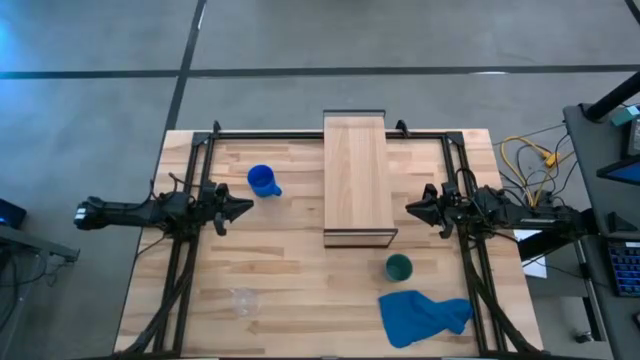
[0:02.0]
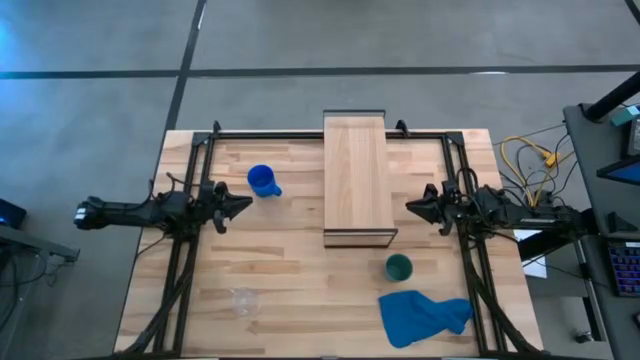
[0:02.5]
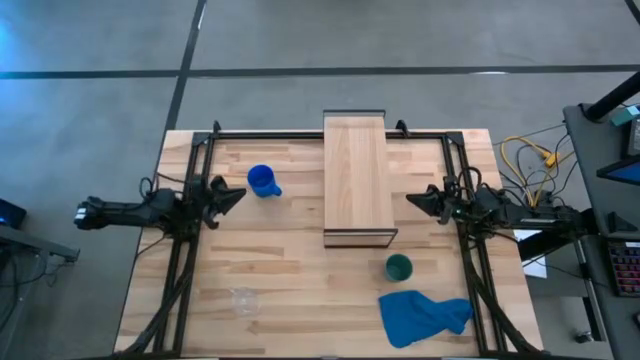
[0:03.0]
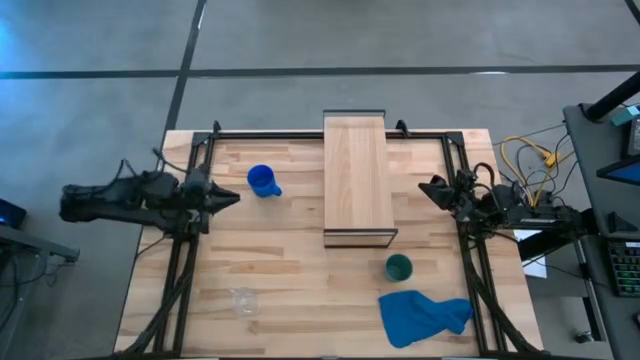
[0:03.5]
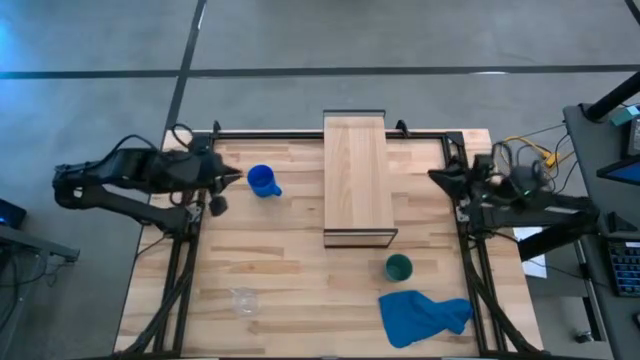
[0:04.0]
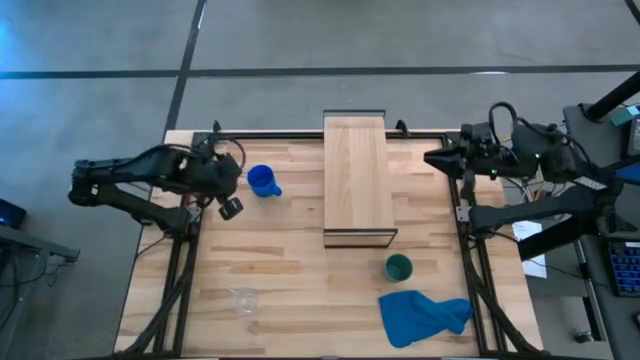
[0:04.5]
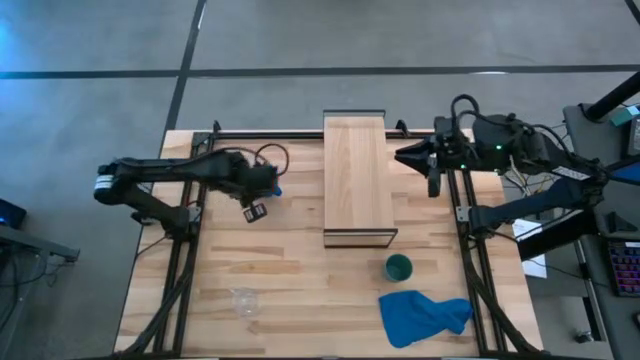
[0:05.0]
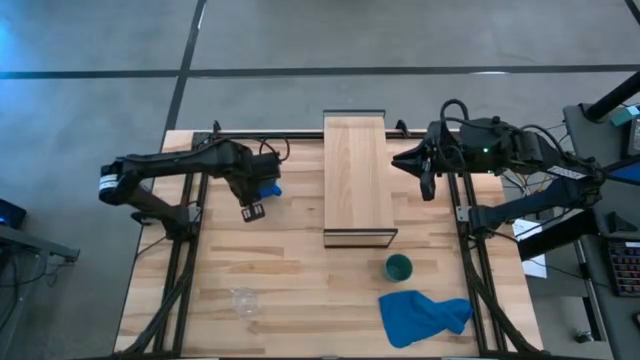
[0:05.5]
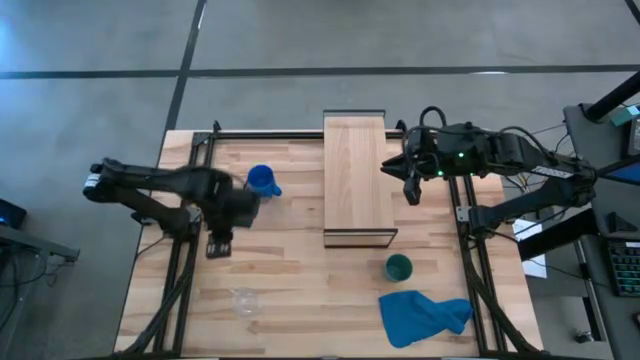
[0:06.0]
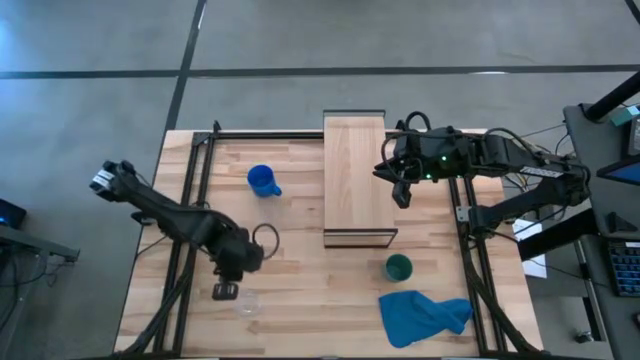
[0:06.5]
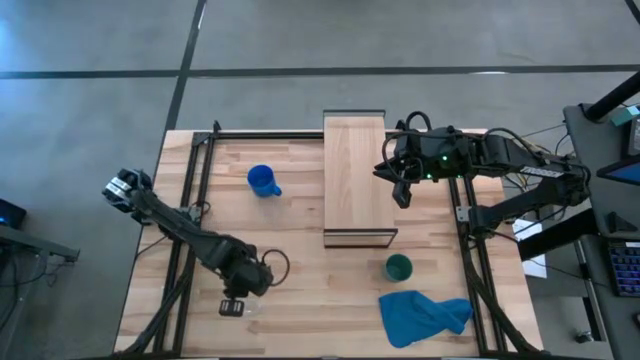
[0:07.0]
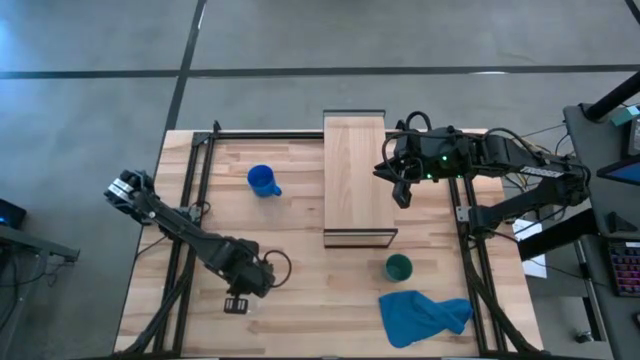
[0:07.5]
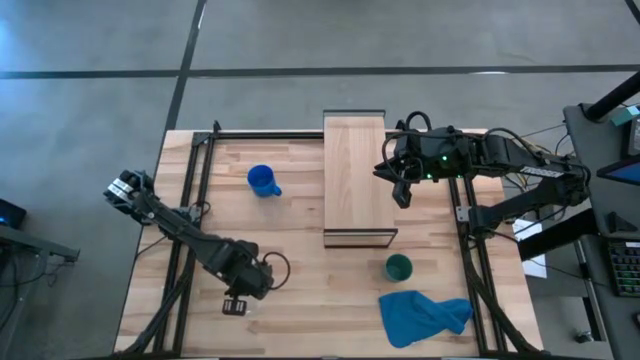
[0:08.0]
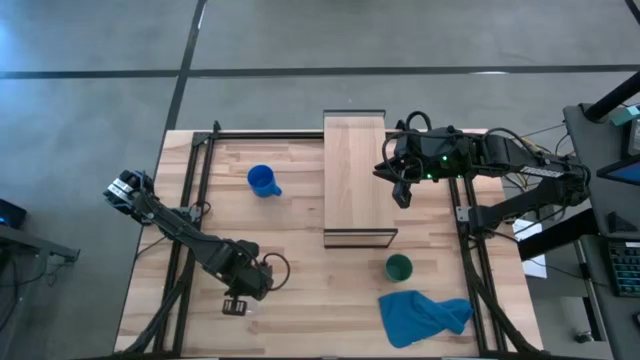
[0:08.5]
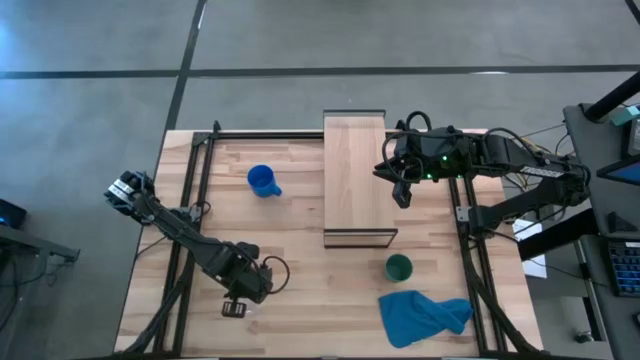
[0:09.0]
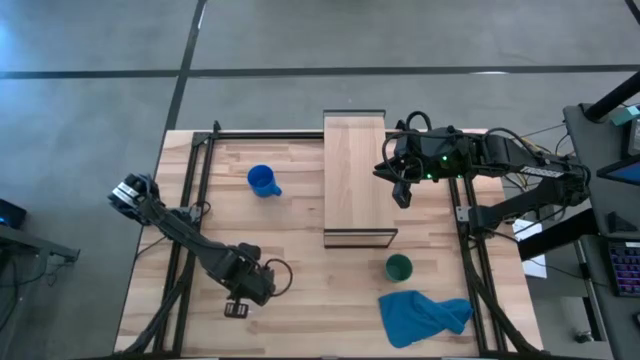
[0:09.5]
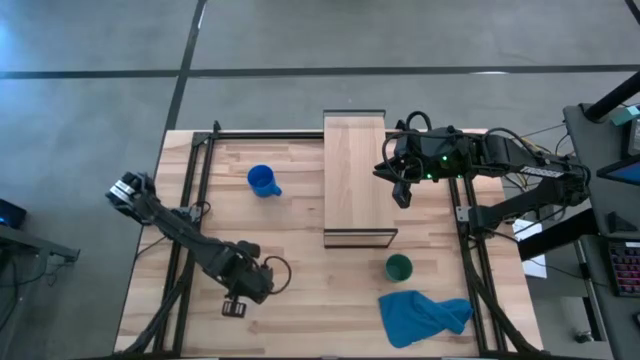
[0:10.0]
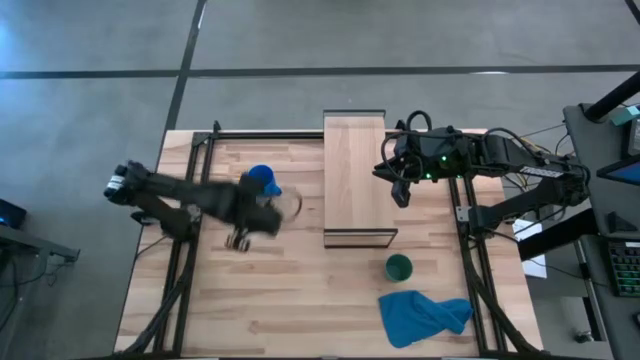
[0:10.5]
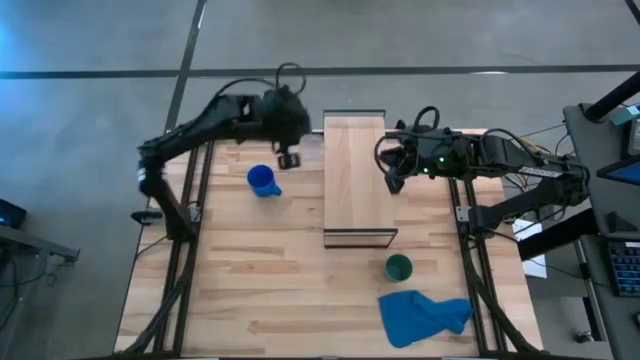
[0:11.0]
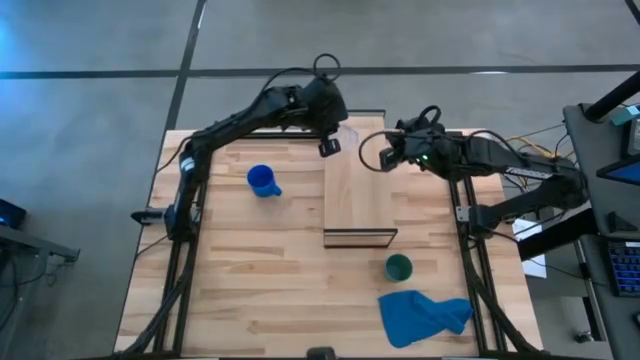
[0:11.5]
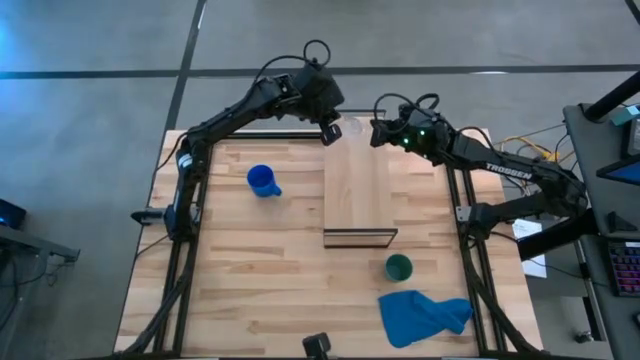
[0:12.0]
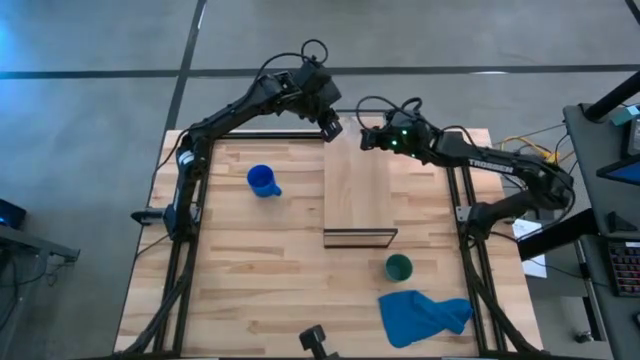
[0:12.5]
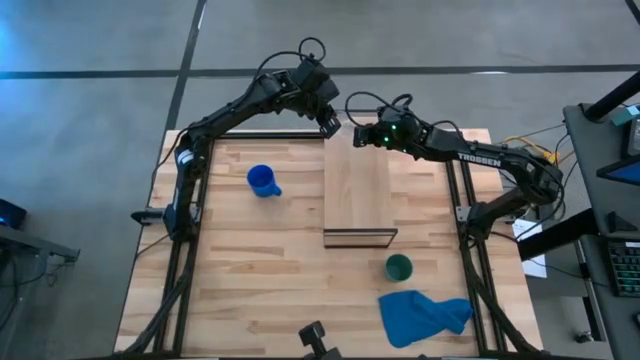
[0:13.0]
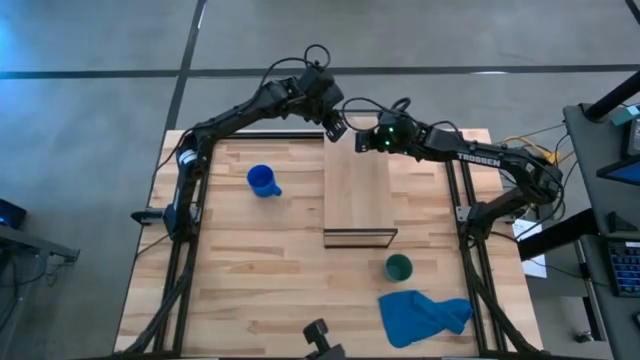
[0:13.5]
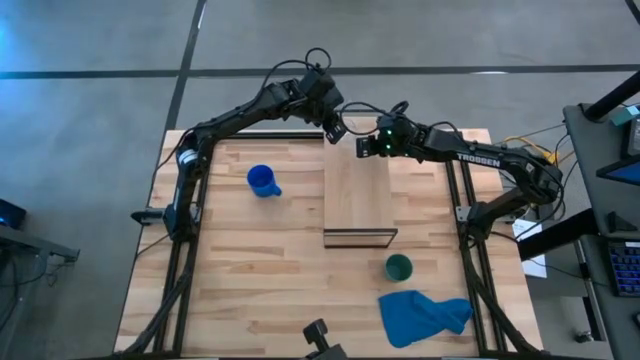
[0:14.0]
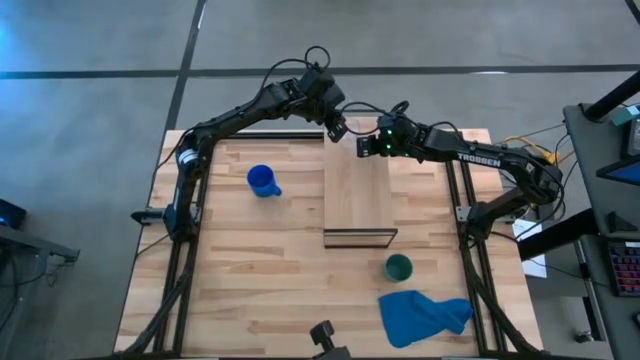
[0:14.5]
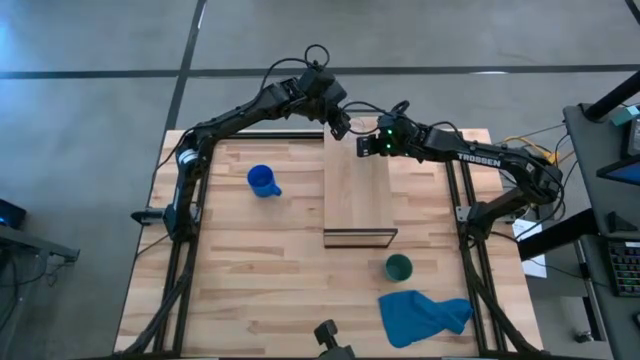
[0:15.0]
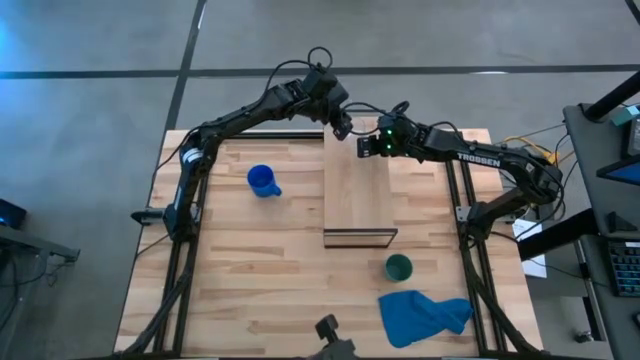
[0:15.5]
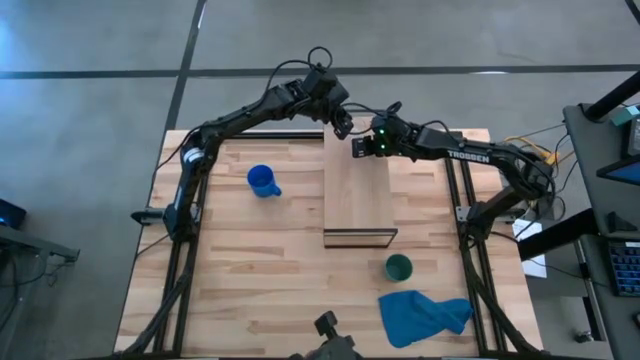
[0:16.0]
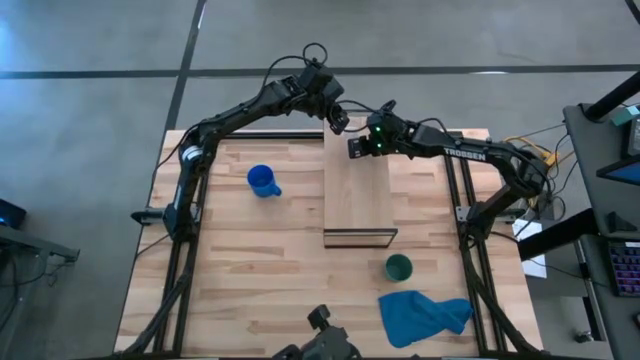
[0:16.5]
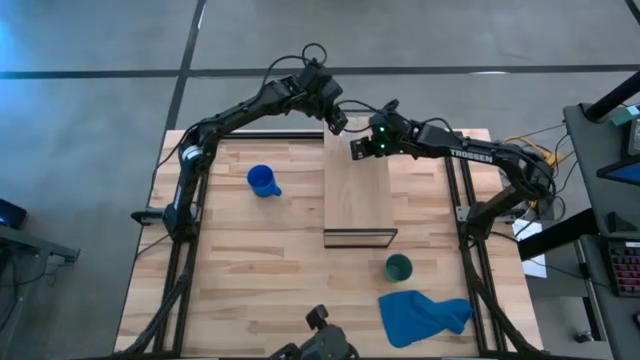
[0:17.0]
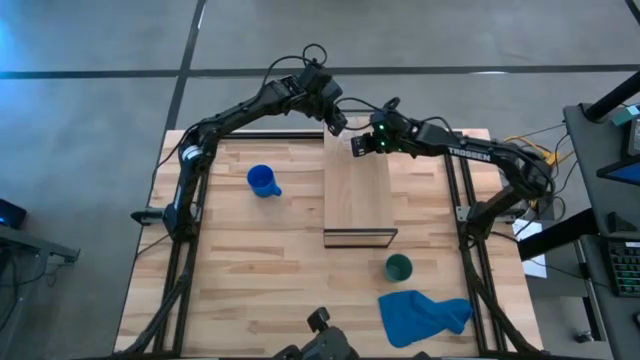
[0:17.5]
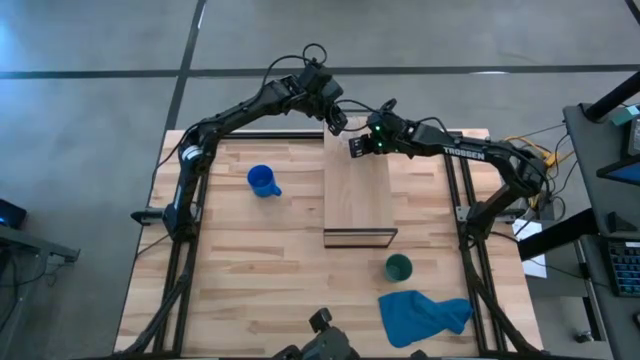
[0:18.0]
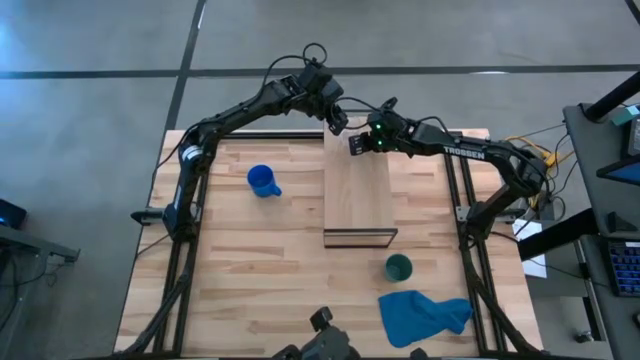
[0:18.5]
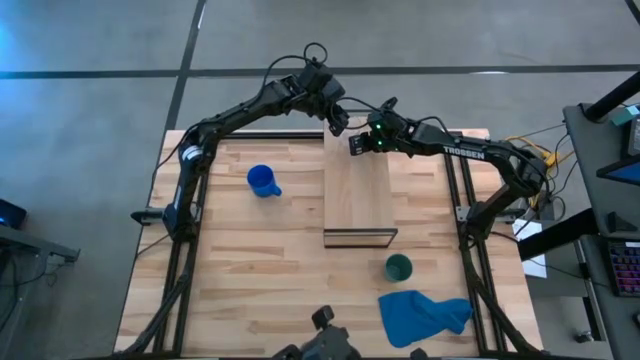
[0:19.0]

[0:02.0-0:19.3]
Task: Stack small to large cups/mugs on shelf
Put the transparent mug on the shelf
